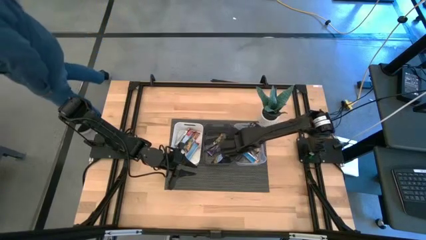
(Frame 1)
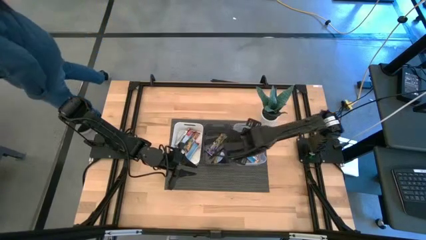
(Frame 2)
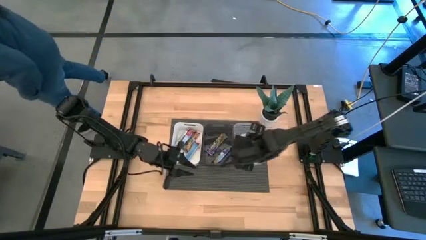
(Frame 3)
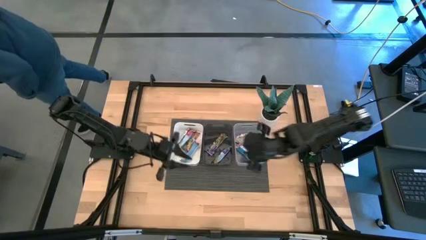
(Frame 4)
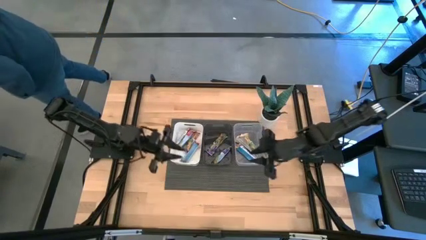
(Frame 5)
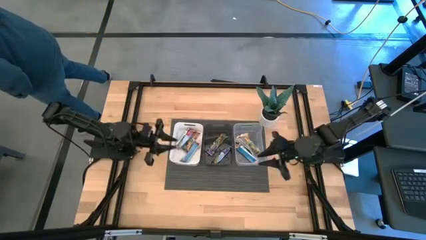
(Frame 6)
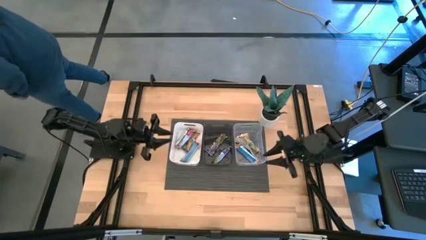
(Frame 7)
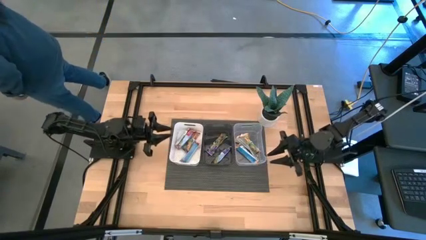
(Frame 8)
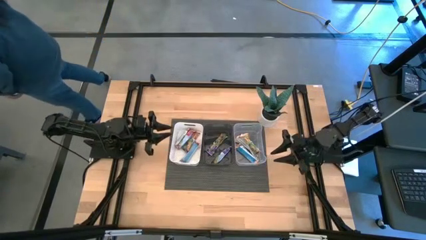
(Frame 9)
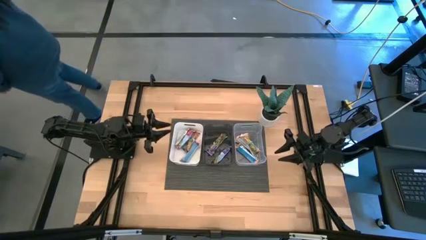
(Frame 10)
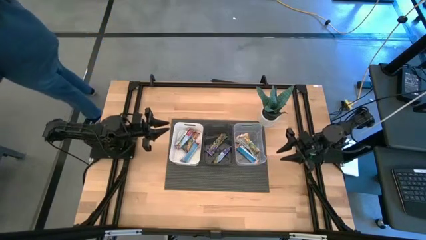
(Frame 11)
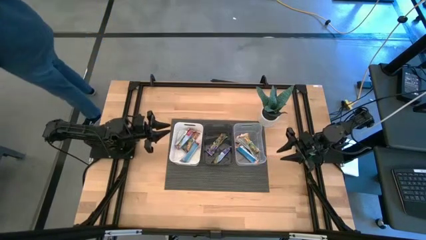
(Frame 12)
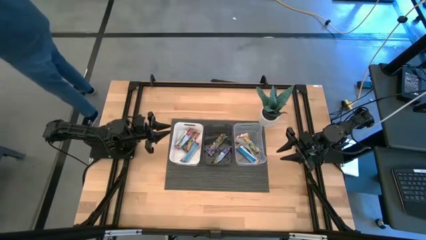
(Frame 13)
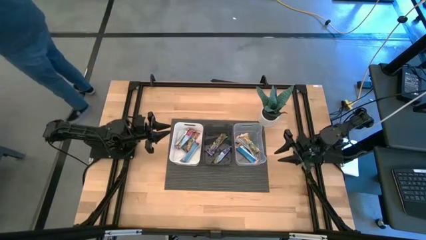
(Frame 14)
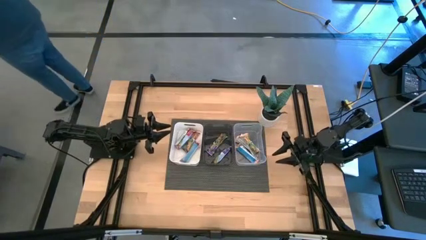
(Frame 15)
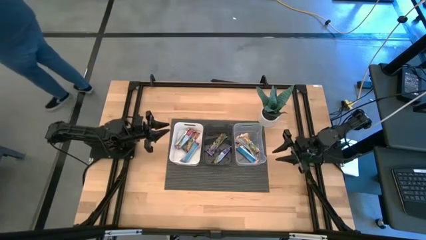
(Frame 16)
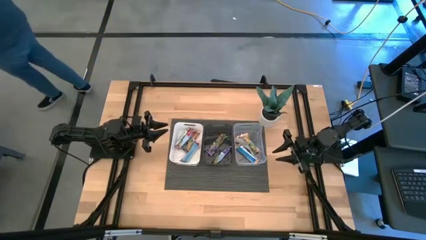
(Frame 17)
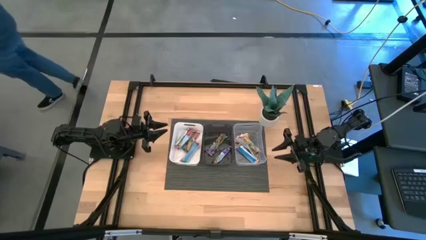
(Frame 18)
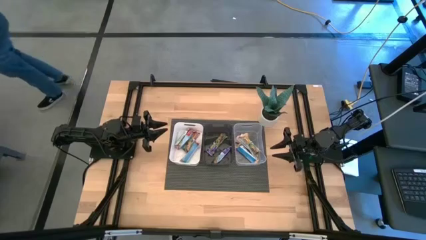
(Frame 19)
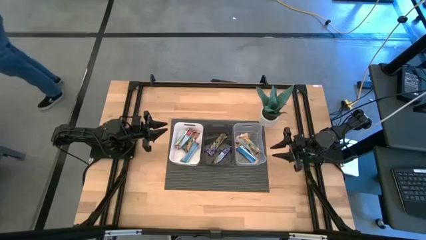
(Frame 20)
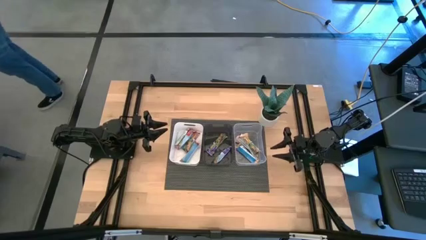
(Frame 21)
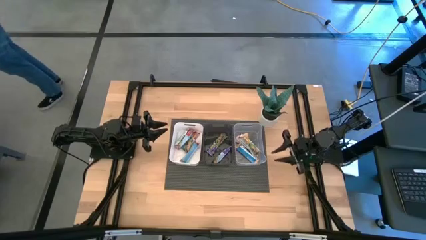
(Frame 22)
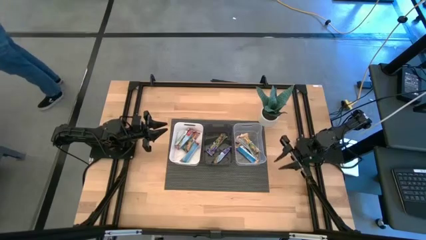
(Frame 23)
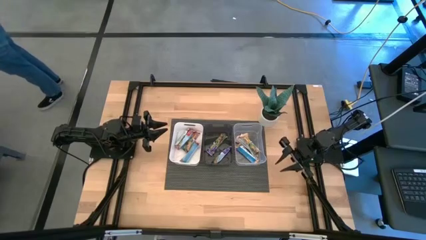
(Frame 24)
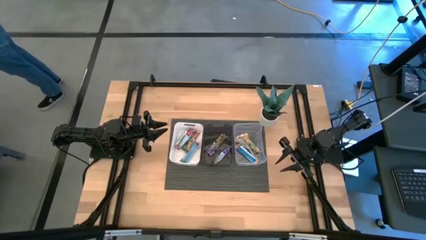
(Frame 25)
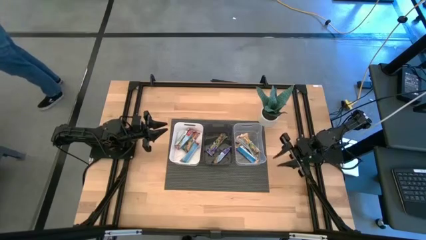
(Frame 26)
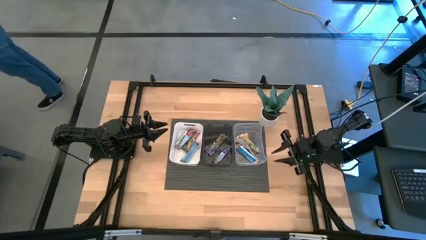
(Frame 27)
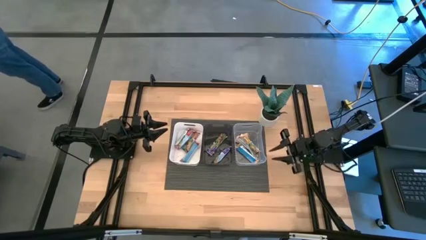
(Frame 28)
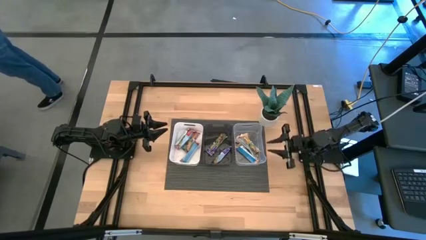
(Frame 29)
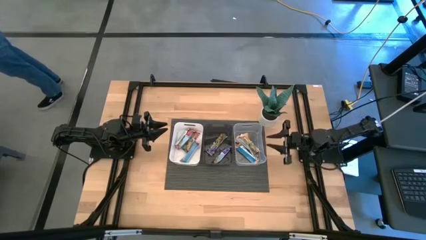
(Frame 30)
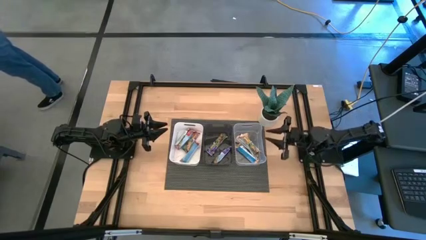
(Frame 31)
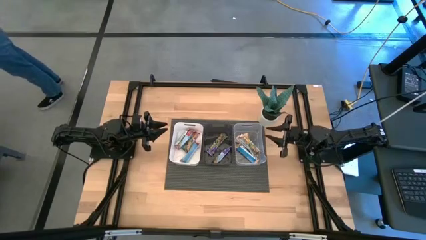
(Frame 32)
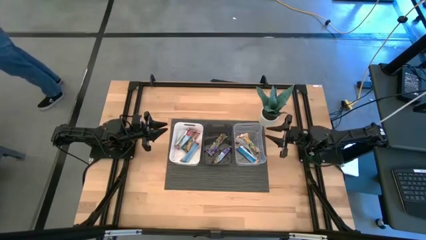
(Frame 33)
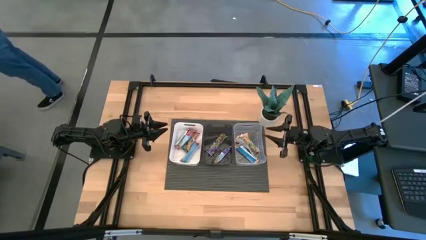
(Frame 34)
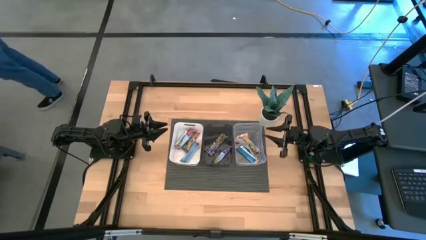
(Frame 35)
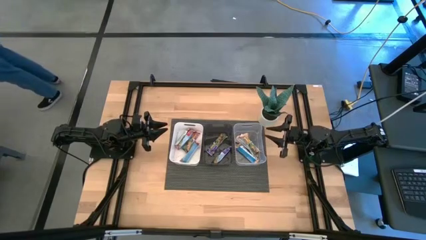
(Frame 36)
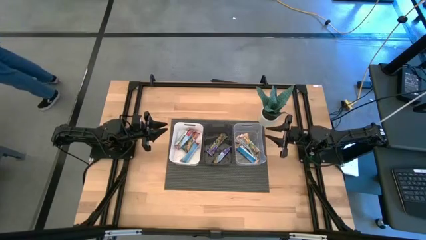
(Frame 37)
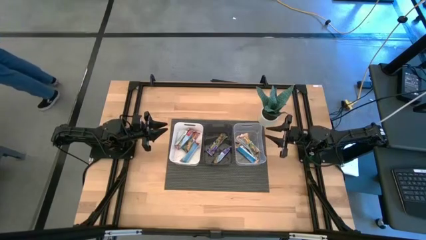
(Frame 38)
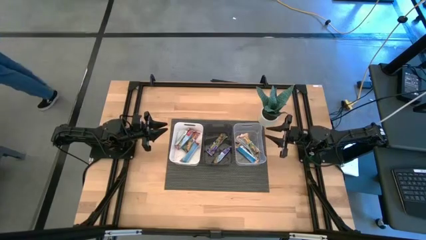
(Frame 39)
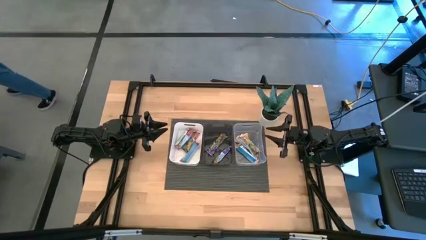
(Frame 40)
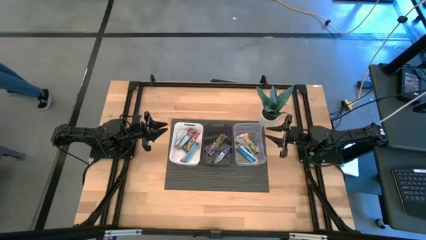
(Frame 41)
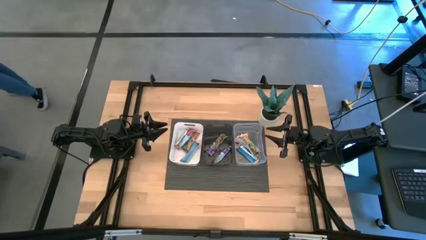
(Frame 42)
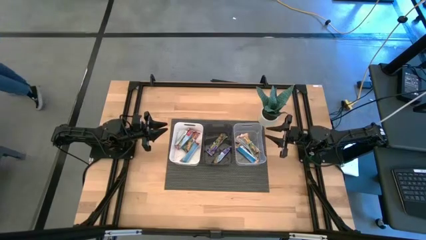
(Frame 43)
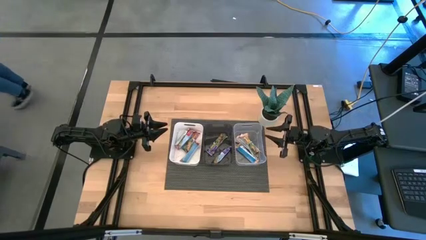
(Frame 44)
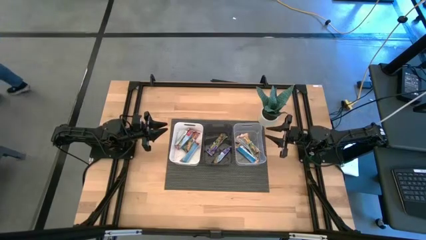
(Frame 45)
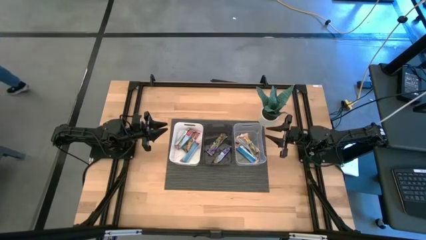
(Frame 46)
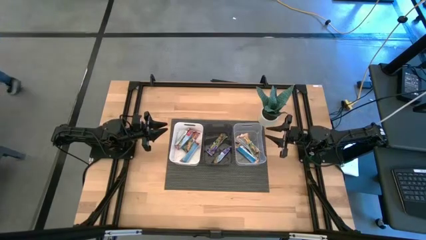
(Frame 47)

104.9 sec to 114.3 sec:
Task: Pick and place Granola Bars by type
Return to Home Position

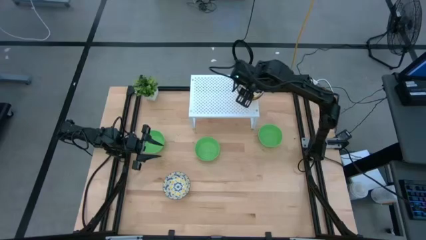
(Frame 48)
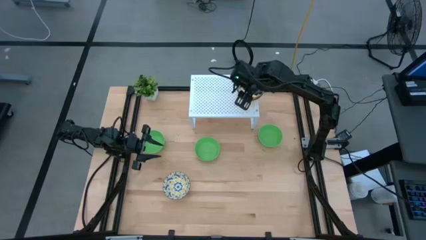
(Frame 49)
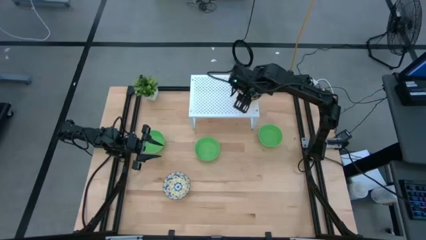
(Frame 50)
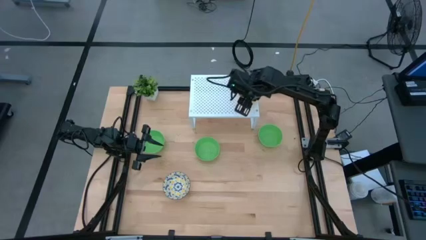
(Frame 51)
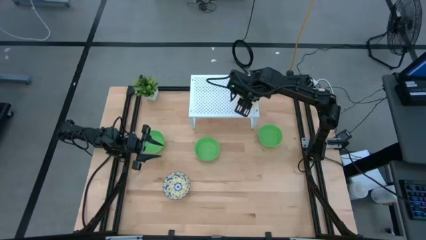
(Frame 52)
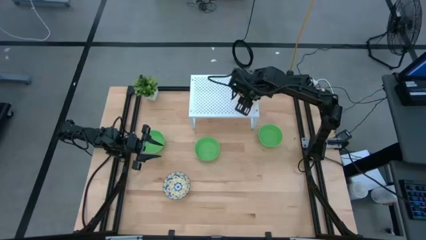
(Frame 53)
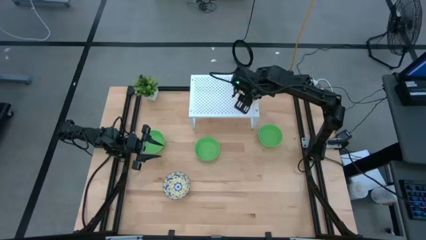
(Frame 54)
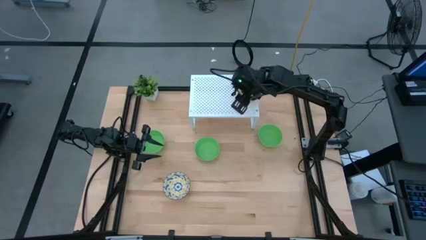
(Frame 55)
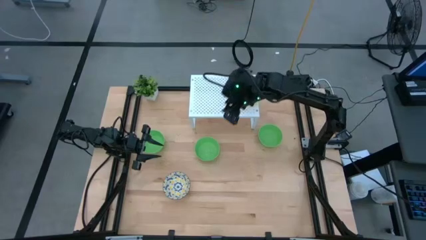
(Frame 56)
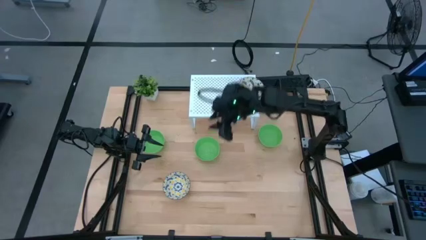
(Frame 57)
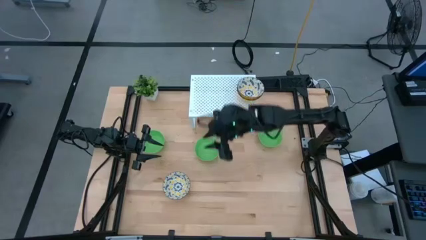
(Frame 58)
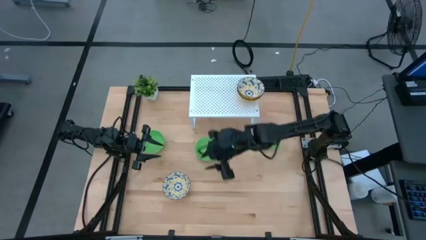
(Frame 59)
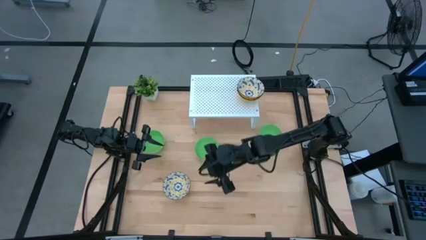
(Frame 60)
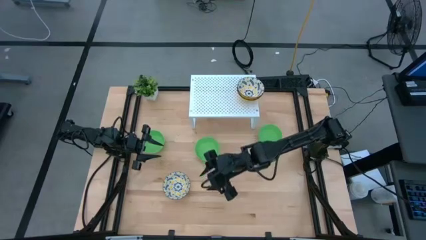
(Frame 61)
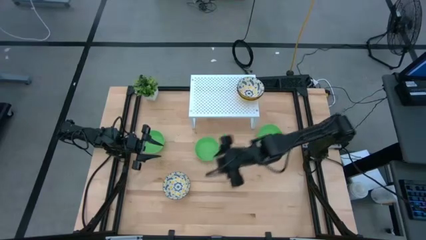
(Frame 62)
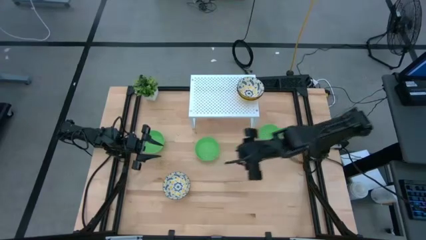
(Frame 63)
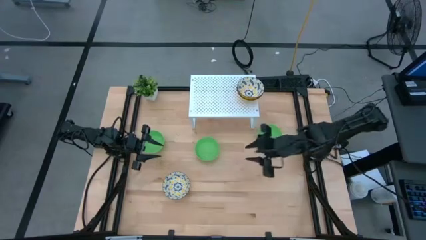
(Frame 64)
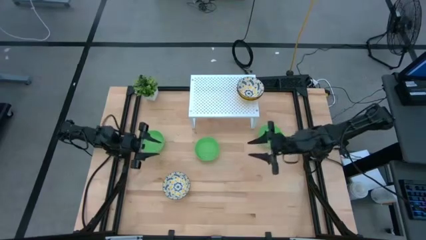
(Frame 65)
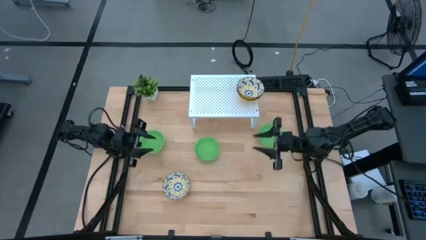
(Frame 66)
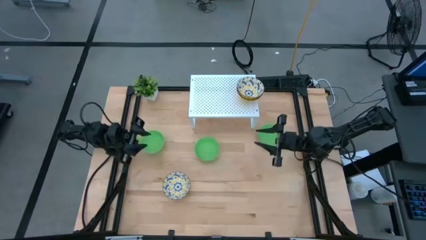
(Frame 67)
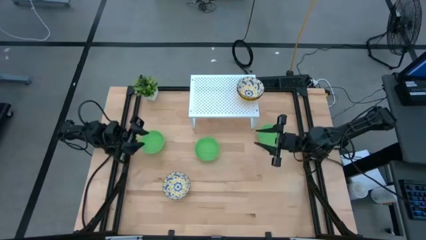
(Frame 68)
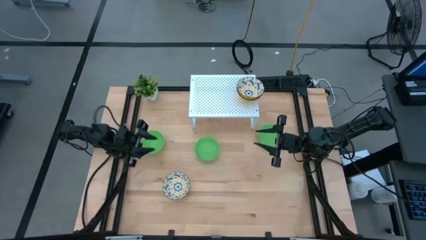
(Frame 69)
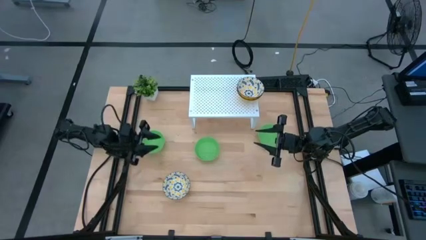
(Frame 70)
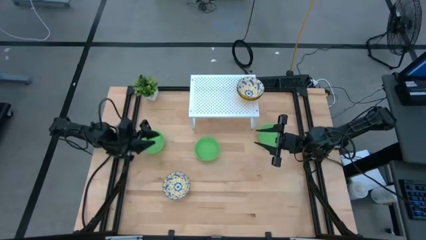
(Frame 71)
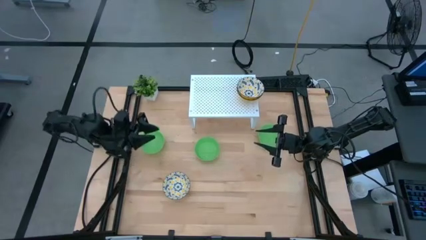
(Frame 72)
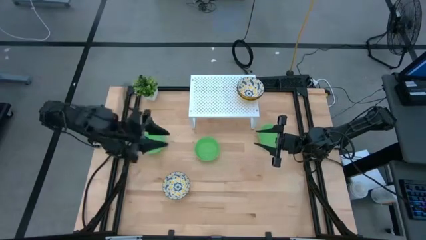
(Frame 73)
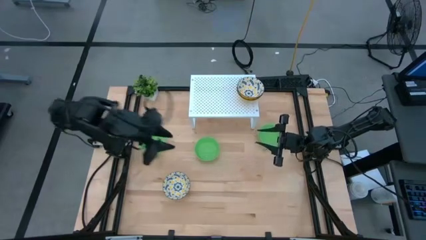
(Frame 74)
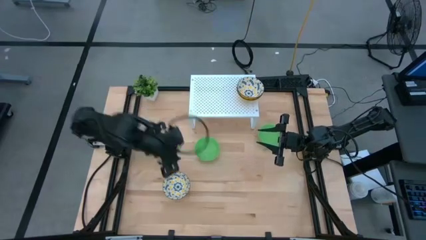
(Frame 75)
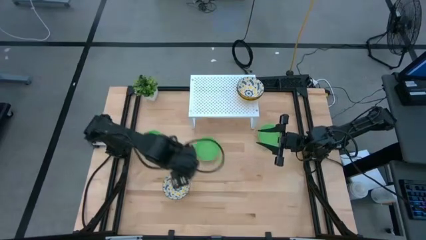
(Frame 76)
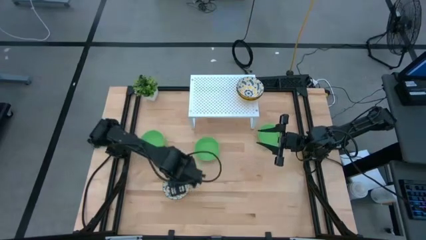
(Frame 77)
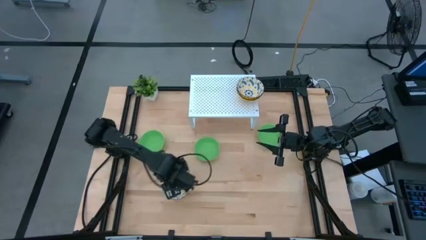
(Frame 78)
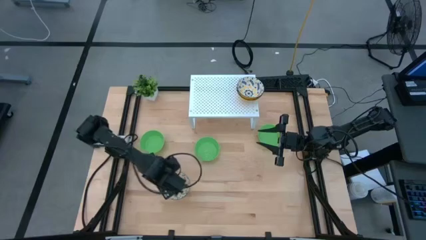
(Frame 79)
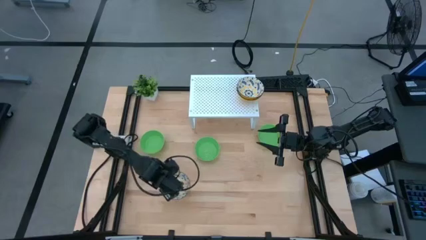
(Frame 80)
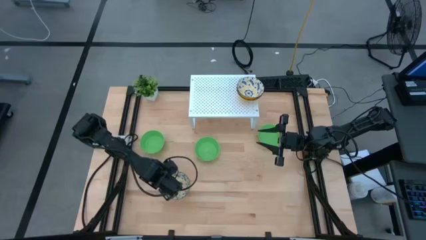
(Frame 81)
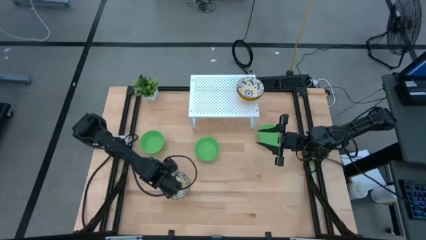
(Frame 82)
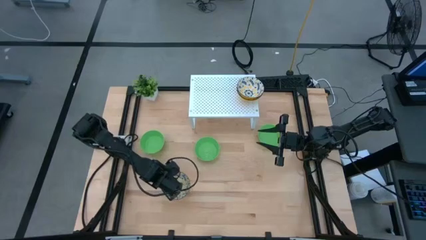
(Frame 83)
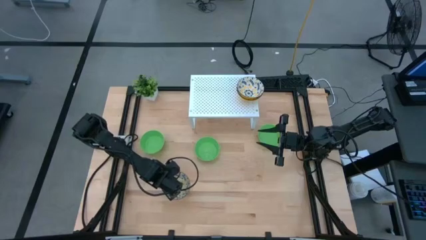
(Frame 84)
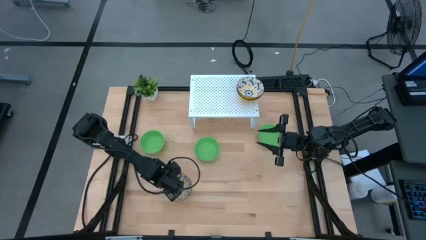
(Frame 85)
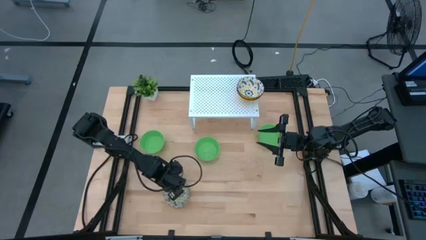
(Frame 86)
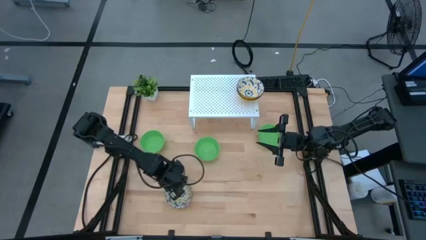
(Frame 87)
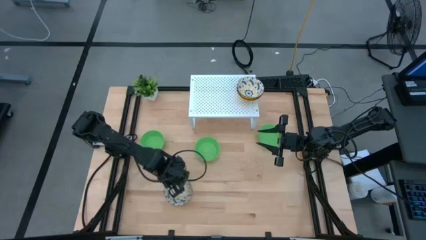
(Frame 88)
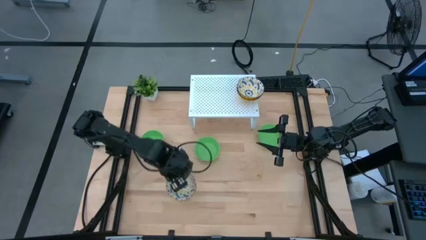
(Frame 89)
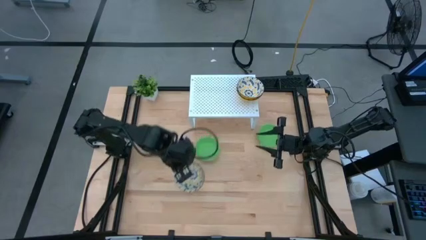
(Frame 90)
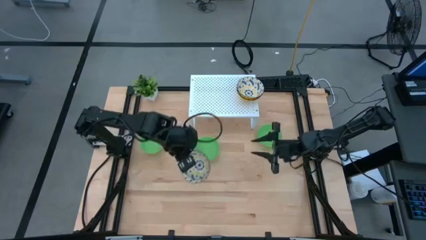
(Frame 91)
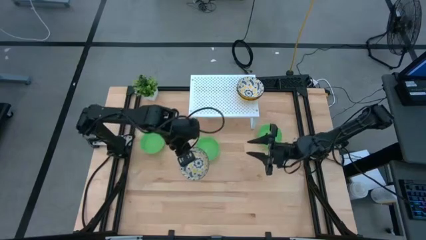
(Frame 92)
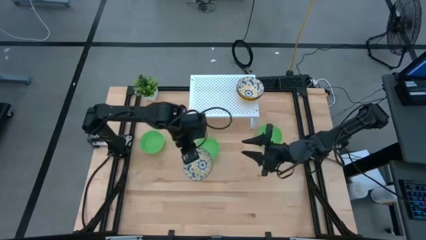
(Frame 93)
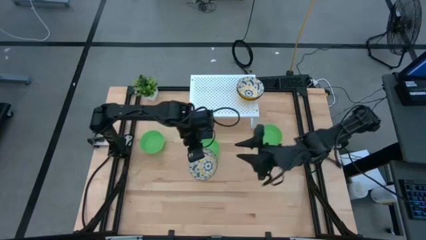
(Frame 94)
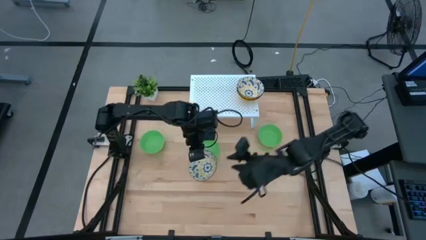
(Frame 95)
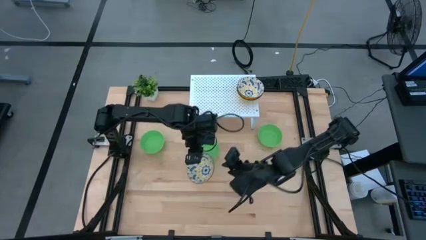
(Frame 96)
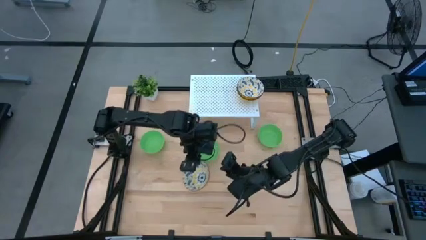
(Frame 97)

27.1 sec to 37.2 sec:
Task: Pick & Place Mini bowls
Stack the blue and yellow patterned bowl on top of the blue and yellow patterned bowls on the shelf
